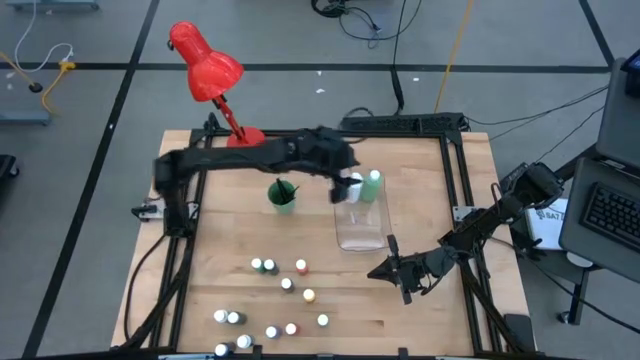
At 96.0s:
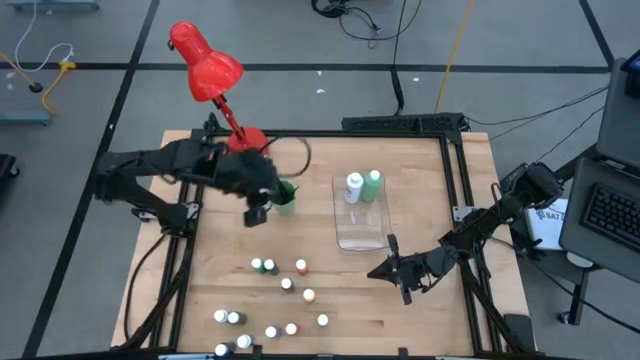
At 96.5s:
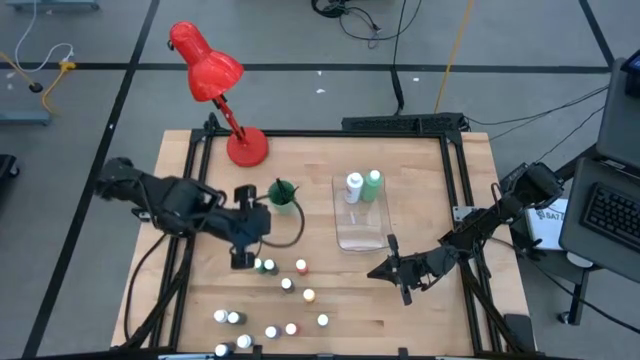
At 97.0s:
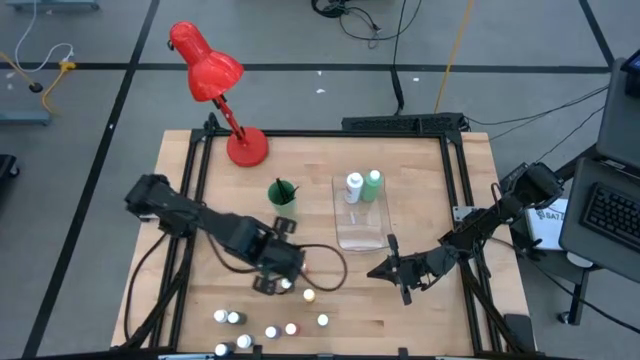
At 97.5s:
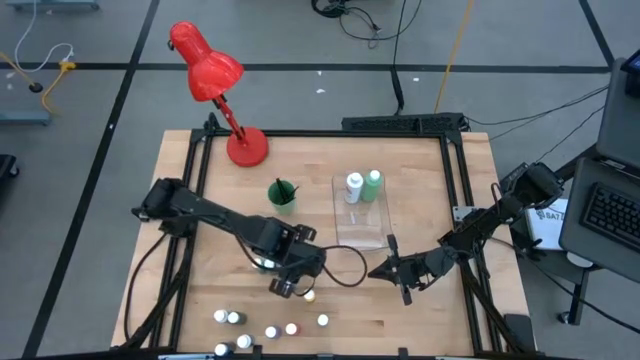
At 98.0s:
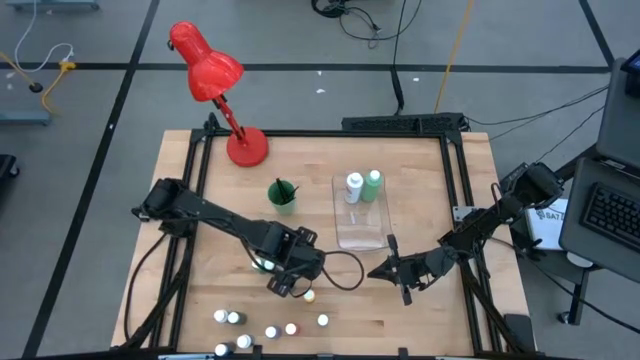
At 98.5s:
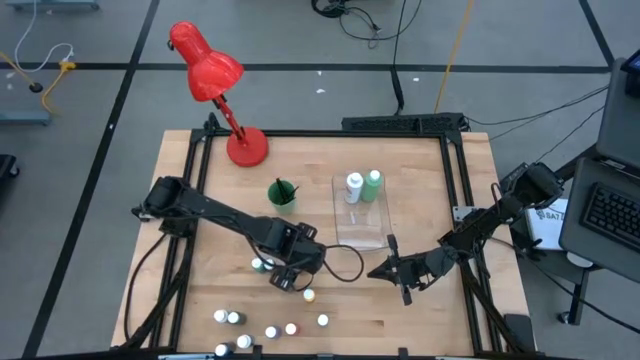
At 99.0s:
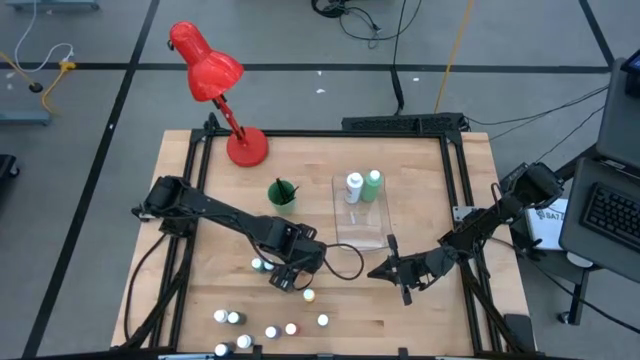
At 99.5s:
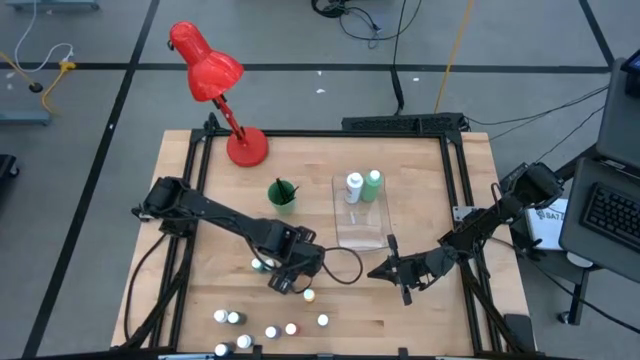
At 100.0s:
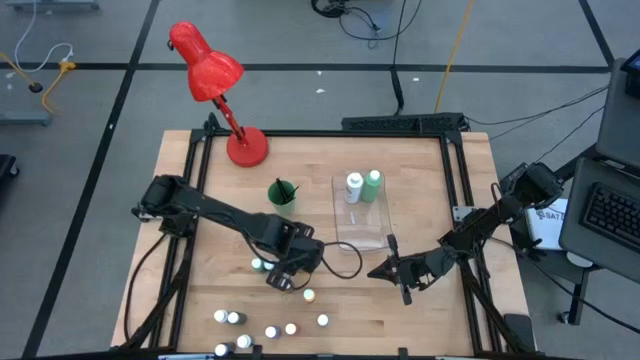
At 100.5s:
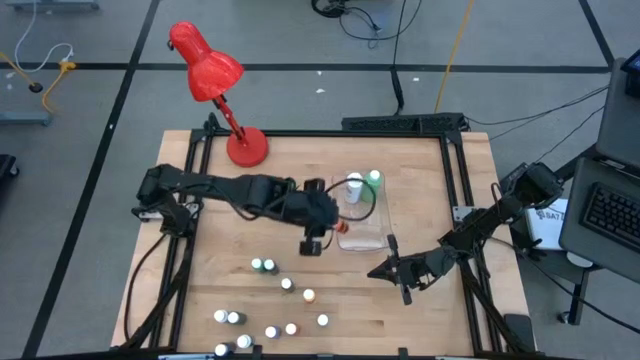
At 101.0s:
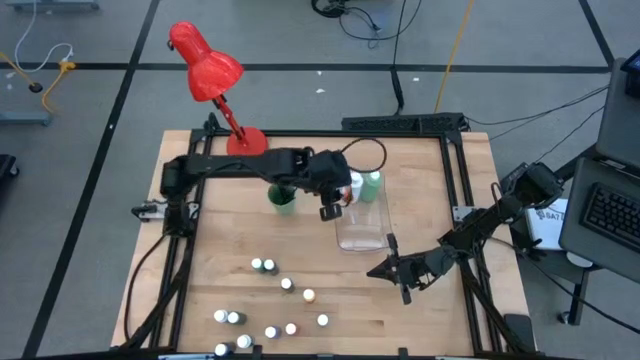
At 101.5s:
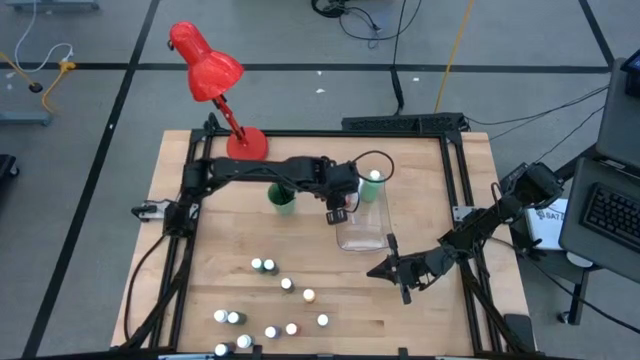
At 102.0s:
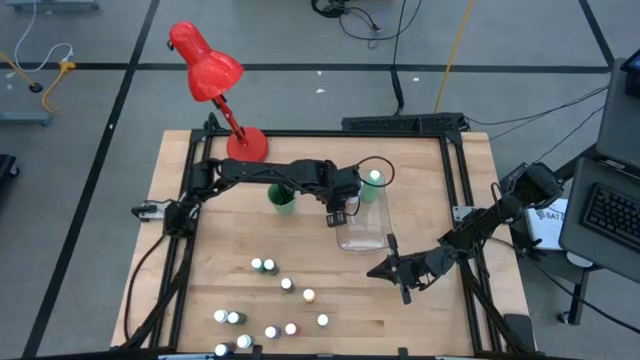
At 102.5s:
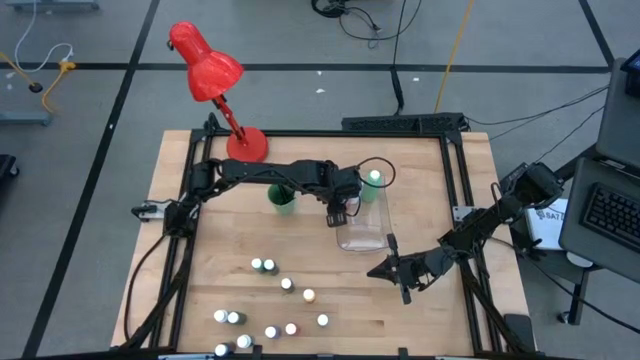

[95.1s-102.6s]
Task: Pick & Place Paint Supplies
Put the small orange paint bottle into the transparent bin

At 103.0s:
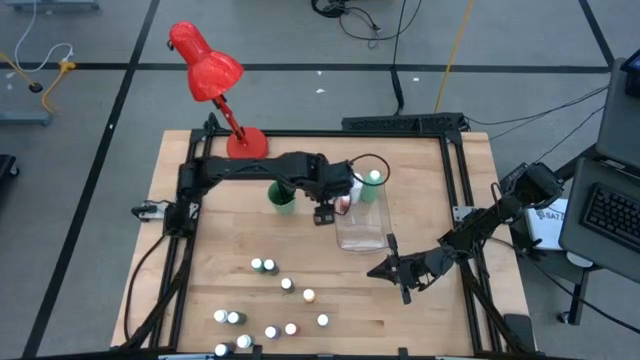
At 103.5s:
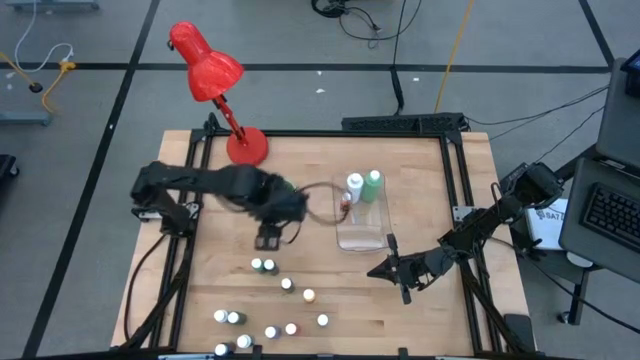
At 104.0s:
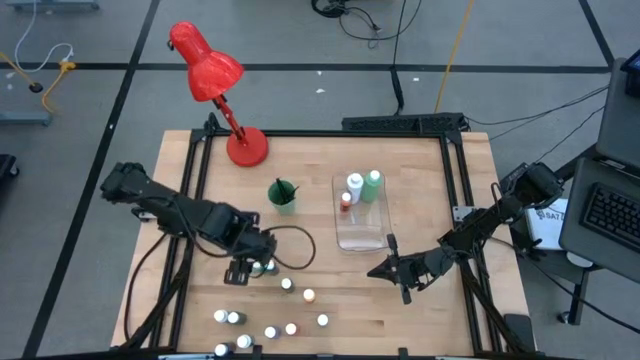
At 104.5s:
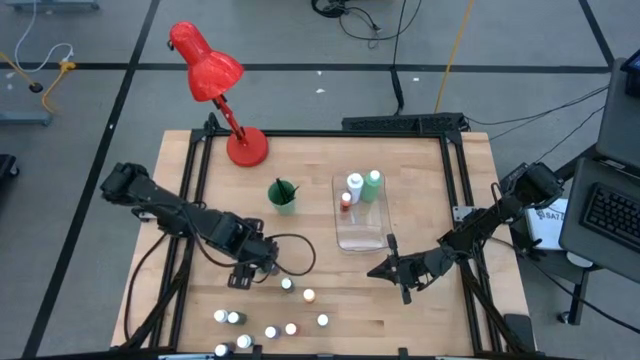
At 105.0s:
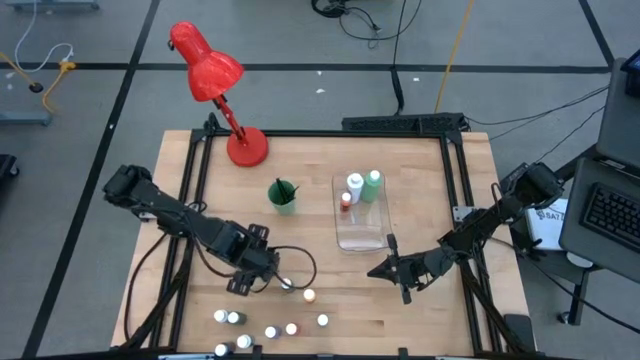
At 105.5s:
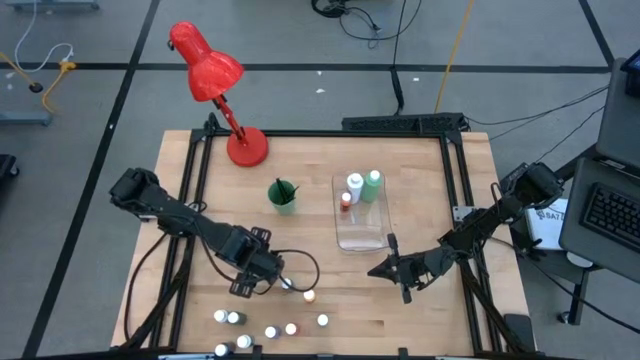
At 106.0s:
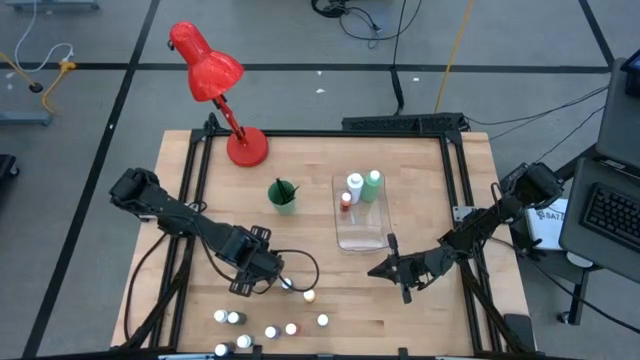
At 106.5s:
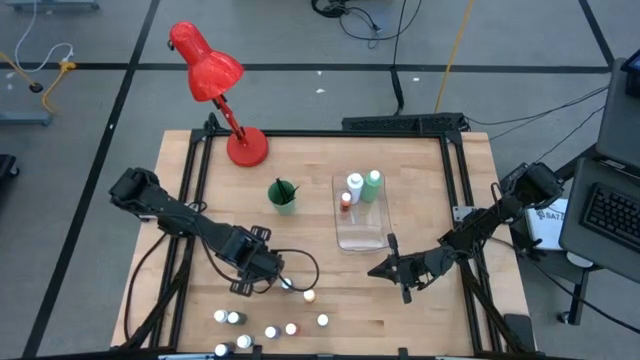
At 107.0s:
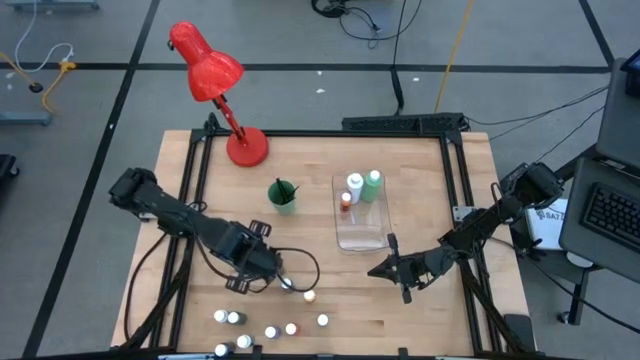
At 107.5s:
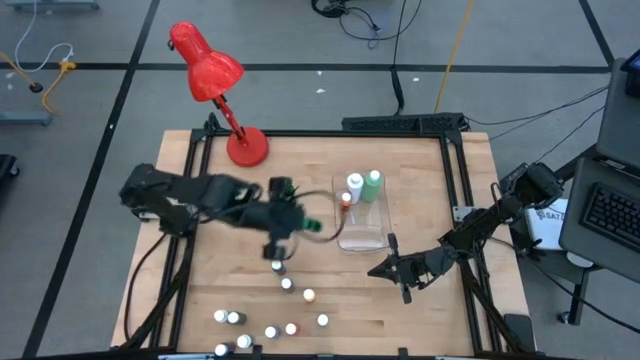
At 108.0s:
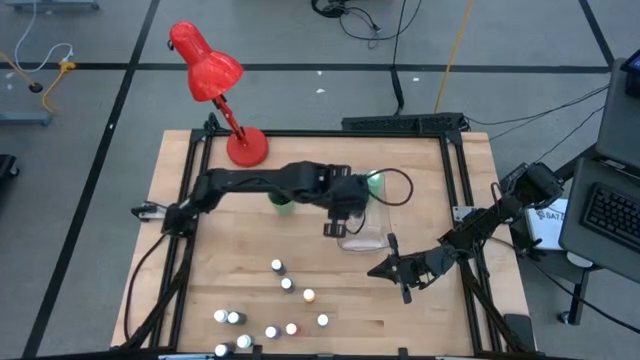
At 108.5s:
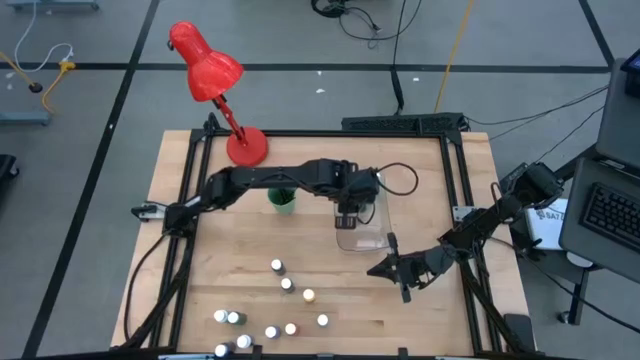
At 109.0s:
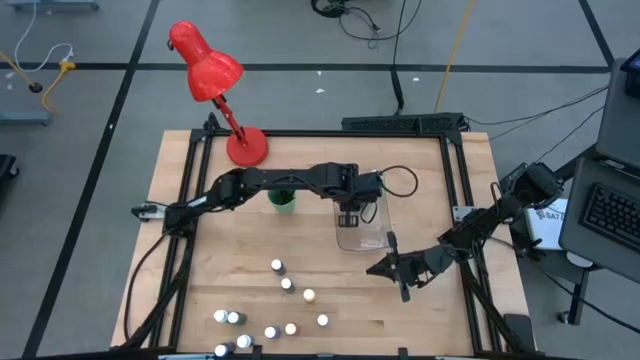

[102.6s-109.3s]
Put the small green paint bottle into the transparent bin

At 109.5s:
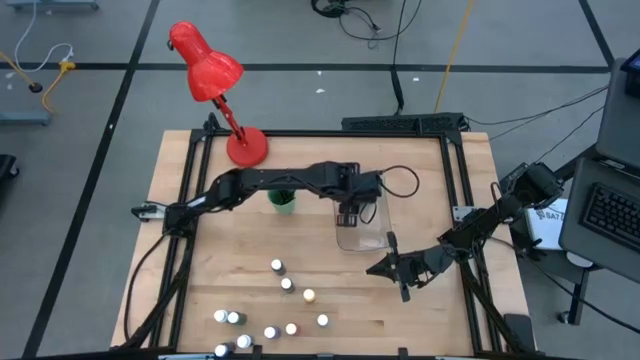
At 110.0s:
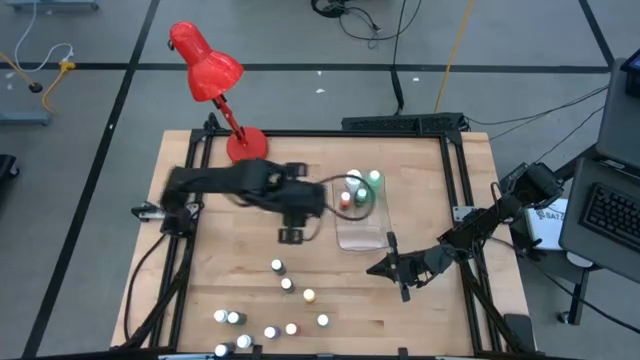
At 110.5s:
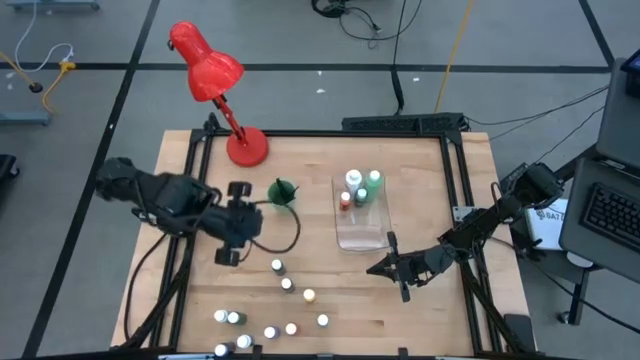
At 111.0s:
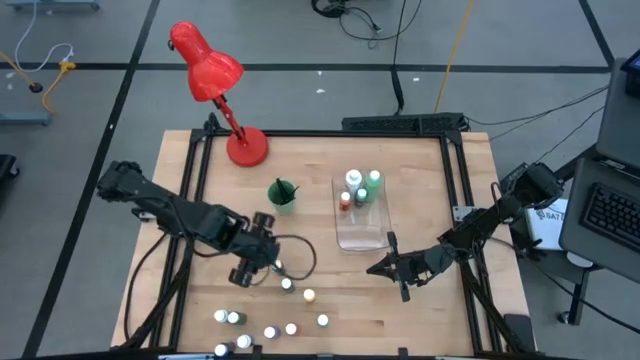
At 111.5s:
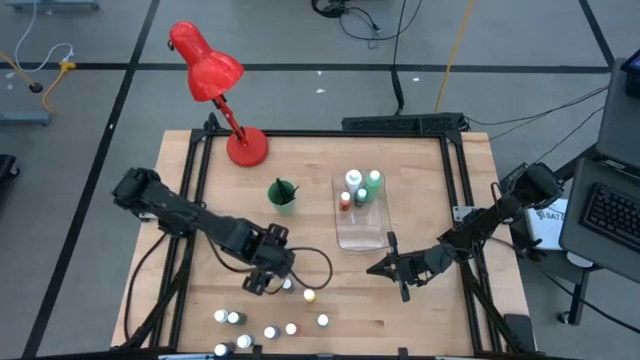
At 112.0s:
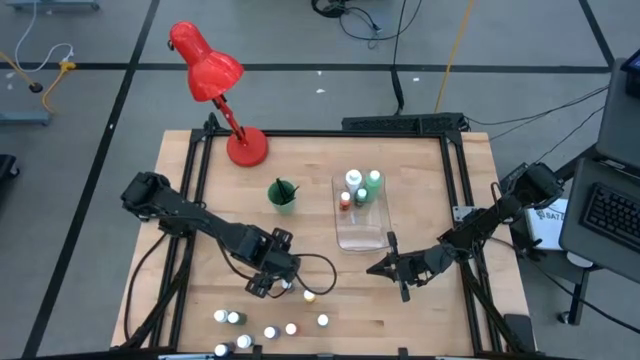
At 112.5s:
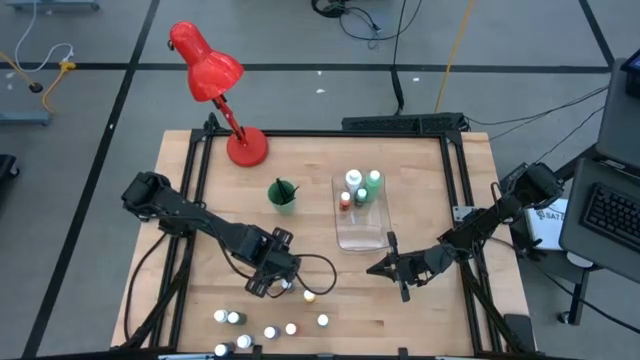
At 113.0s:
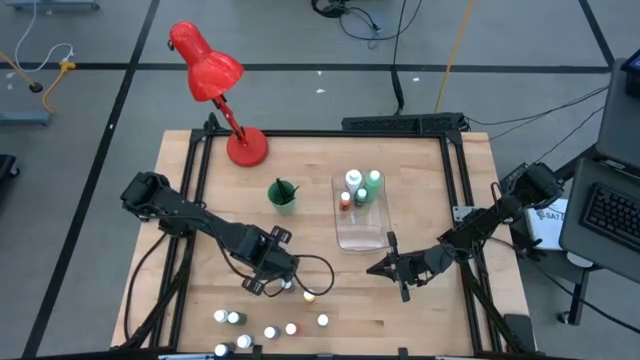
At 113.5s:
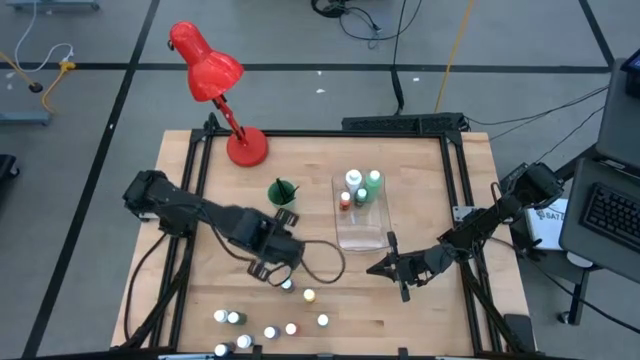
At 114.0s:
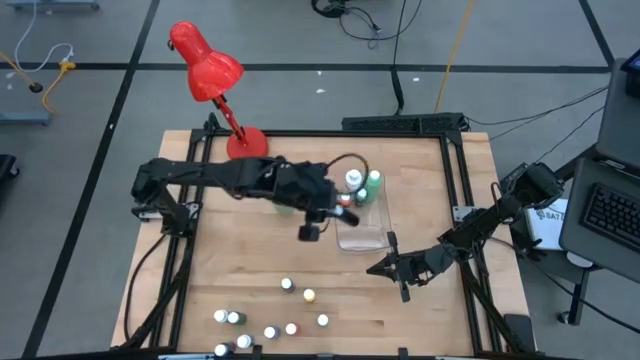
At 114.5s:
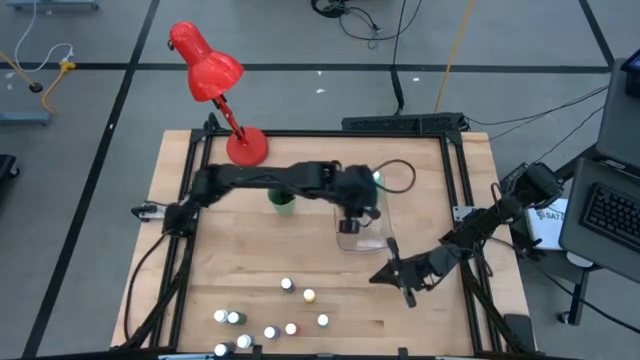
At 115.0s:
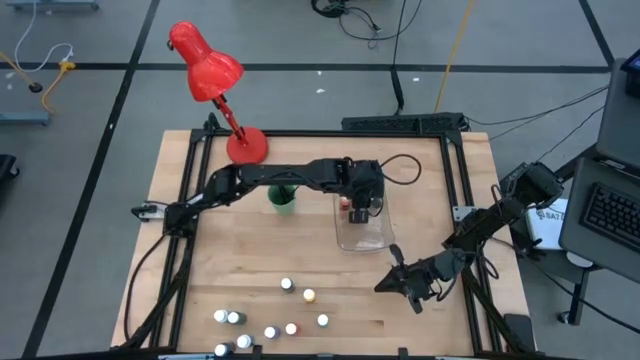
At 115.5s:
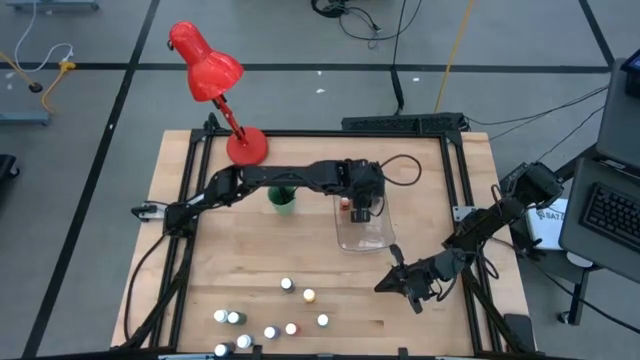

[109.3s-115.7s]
Put the small black paint bottle into the transparent bin

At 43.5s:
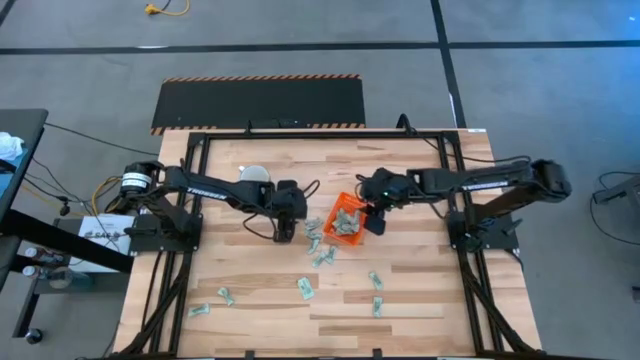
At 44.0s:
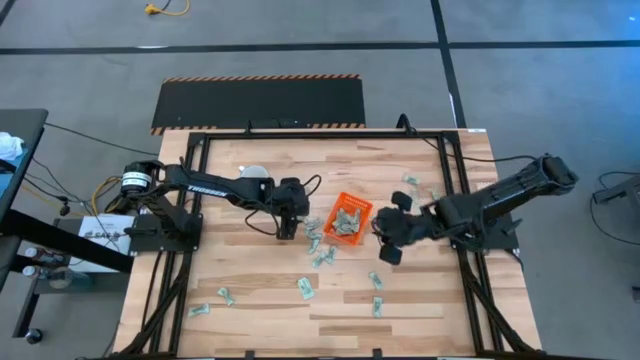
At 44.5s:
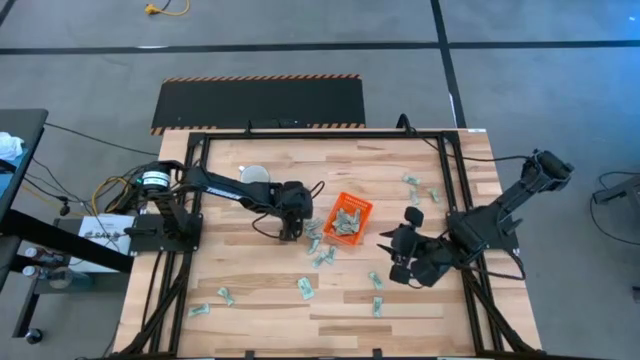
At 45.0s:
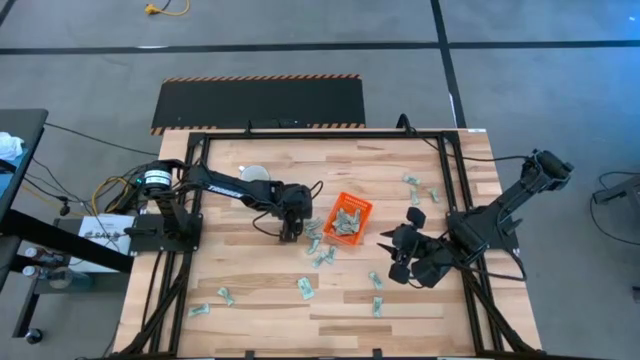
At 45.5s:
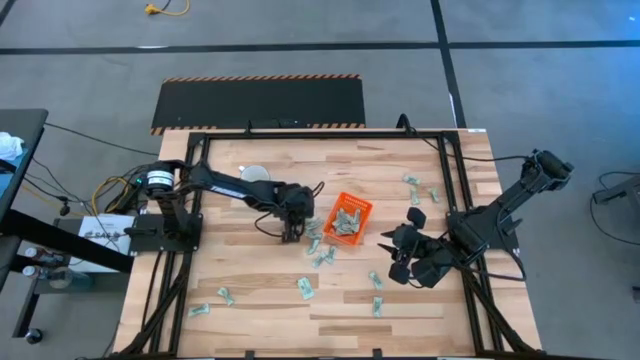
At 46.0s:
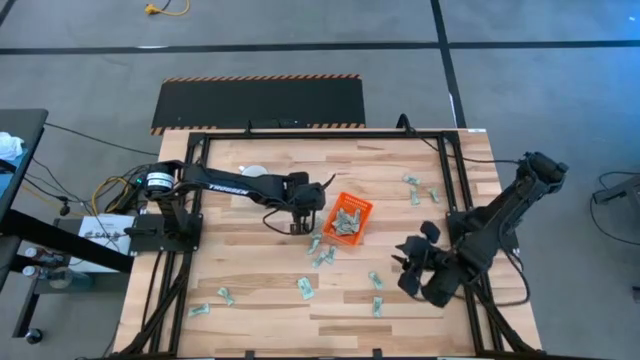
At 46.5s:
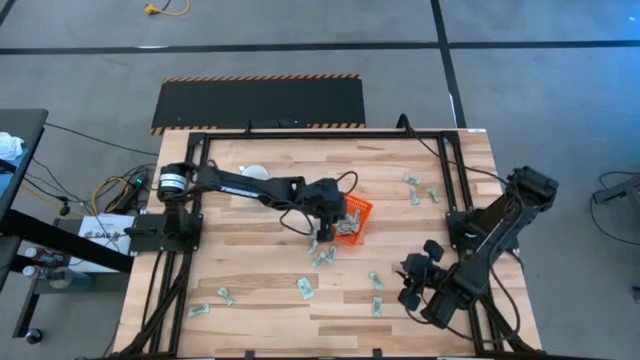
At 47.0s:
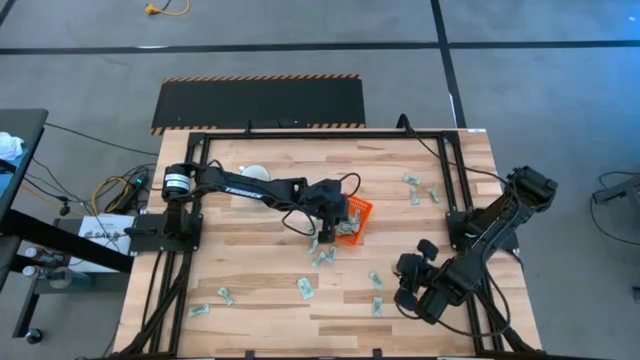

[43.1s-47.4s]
Task: Pick and place Stevia / Truvia into bins
Put the stevia packet into the basket
